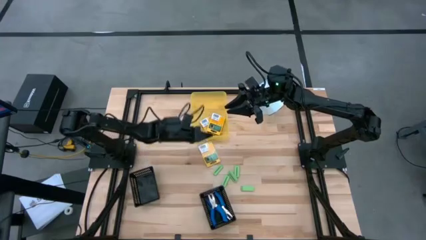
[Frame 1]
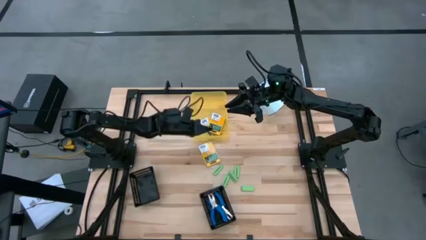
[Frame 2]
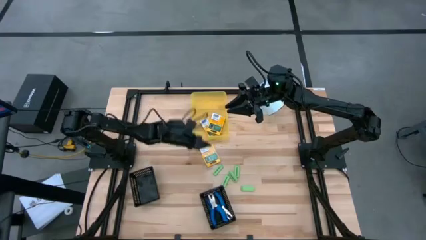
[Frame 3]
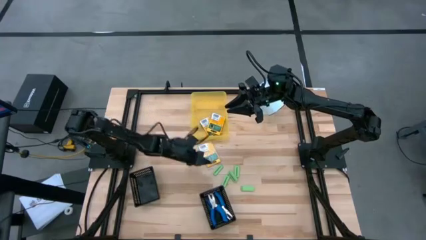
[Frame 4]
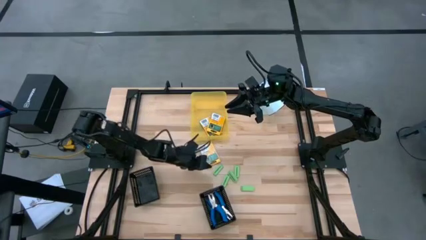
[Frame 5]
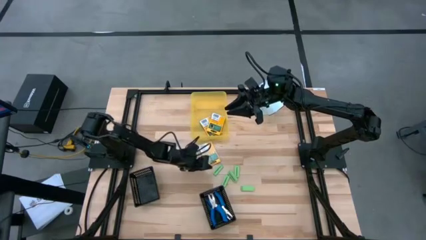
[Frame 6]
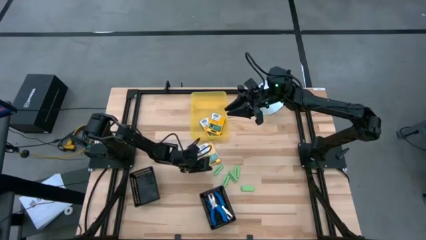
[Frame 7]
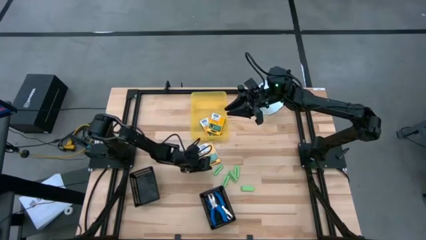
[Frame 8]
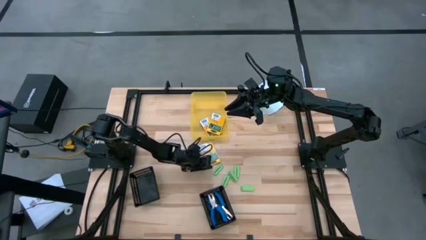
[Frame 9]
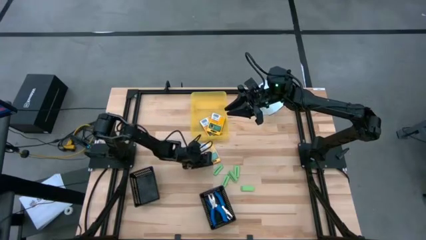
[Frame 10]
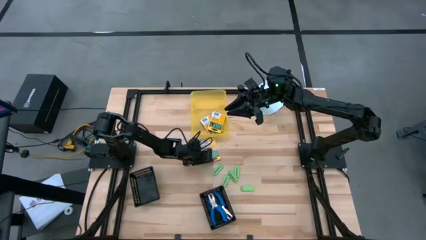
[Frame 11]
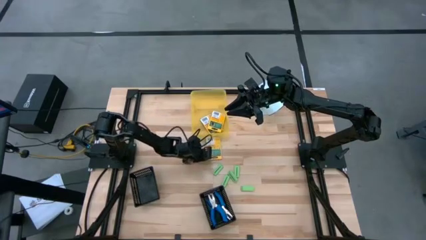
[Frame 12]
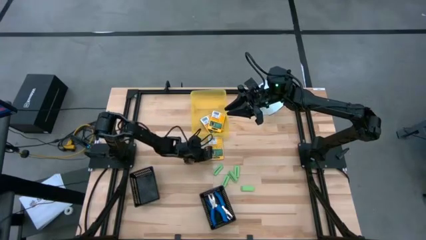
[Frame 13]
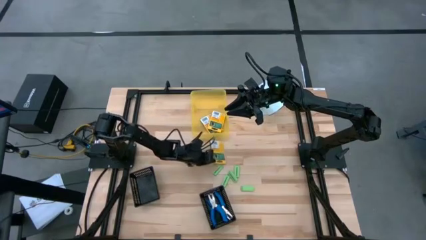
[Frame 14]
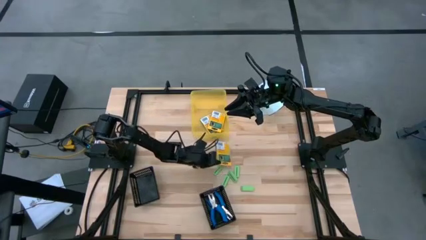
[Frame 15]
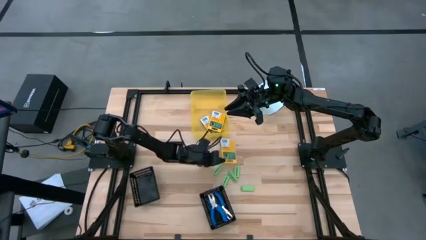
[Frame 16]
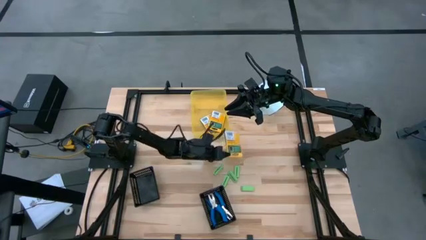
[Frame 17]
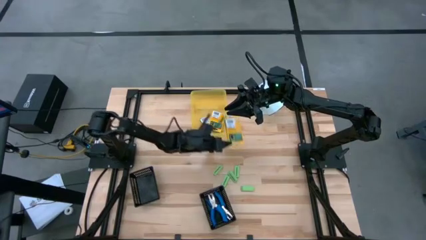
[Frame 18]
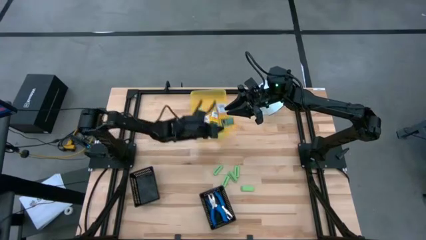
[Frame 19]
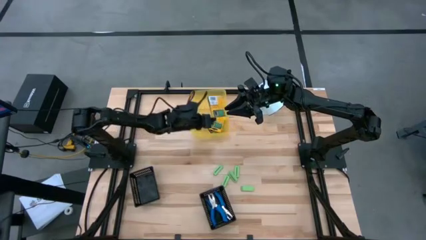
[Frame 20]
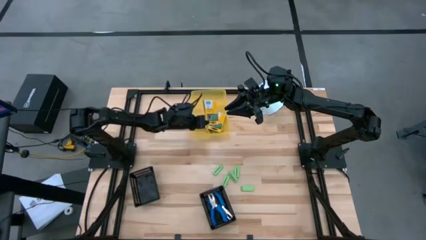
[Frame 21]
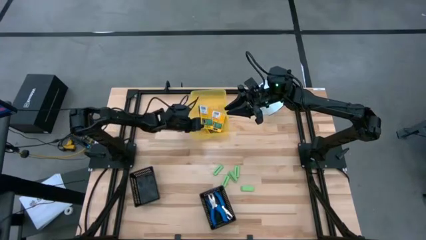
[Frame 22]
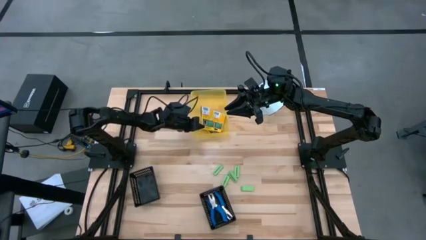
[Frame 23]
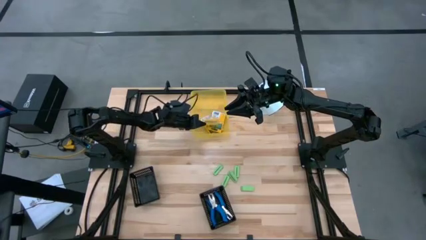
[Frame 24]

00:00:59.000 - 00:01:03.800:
Task: Pick & Place School Supplies
Put the box of crayon into the yellow bin

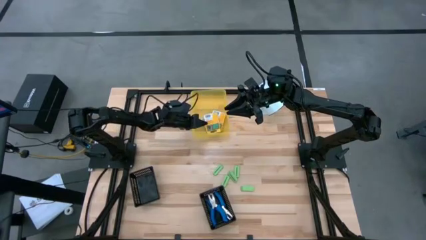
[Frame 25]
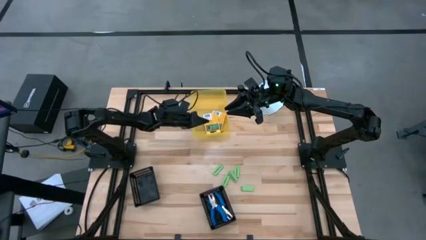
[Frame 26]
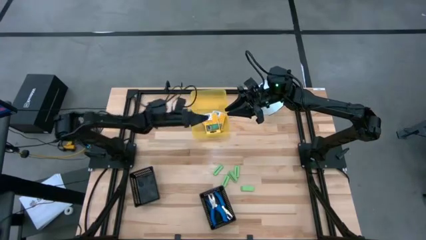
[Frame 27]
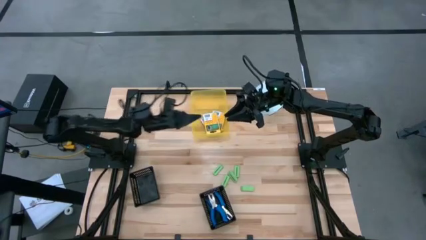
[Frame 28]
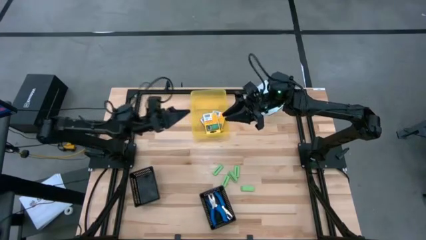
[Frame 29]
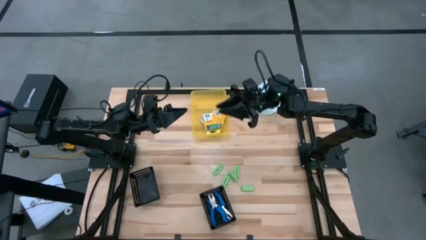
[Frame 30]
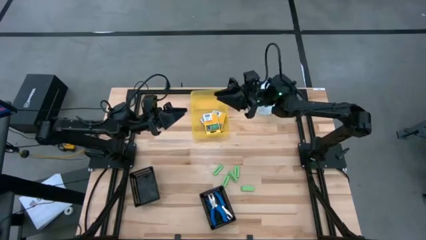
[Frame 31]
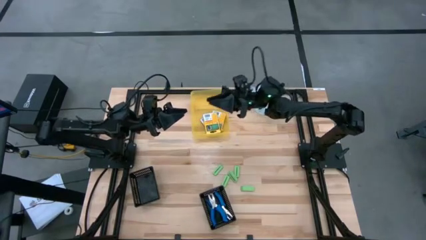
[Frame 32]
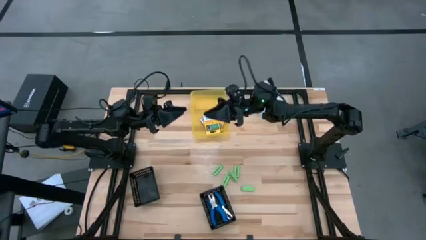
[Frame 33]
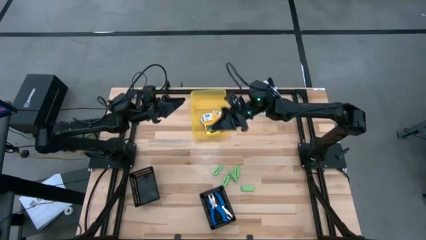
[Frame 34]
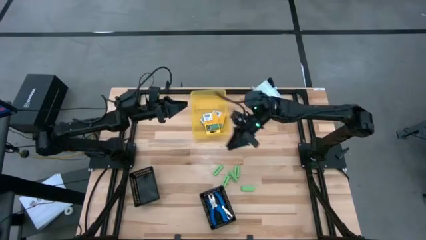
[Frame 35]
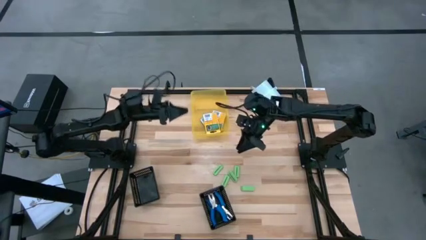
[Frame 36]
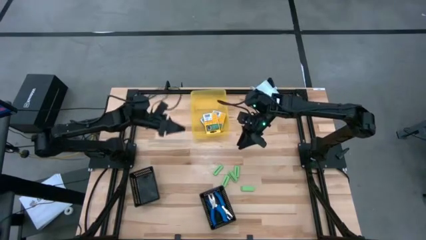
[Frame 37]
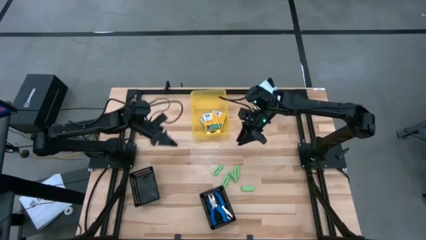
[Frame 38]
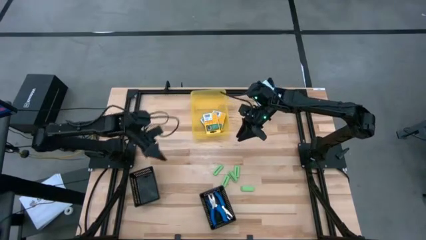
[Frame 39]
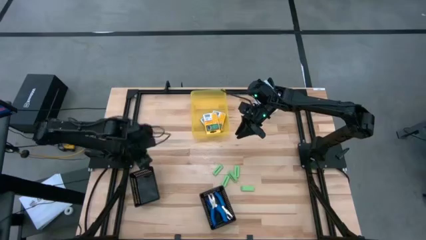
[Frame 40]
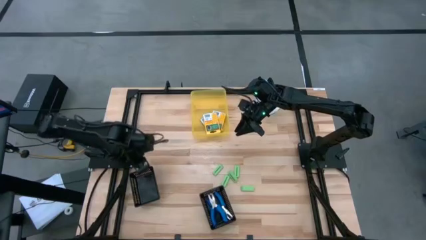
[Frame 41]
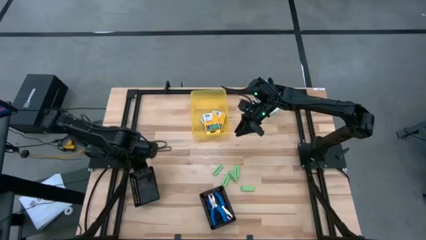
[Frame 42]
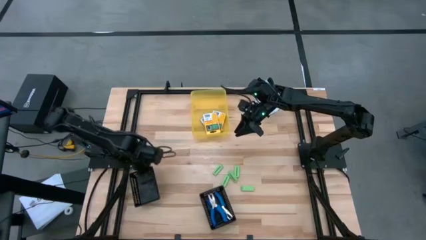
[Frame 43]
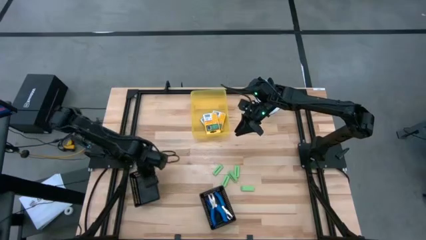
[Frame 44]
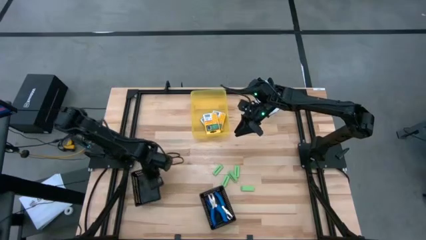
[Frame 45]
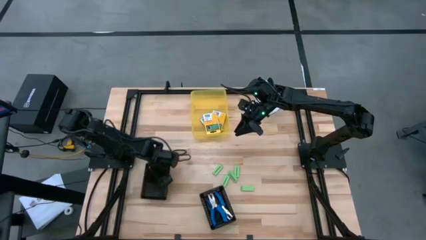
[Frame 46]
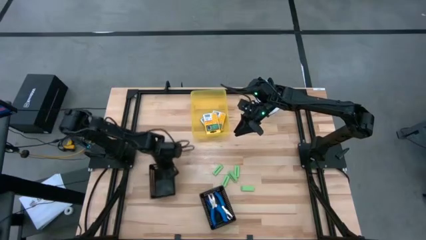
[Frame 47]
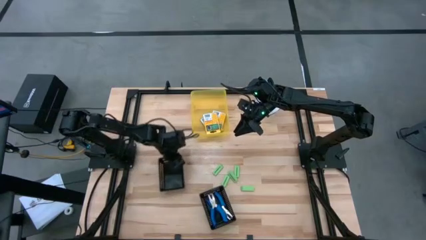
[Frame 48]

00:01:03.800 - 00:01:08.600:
Adjust the left black bin into the middle left of the table

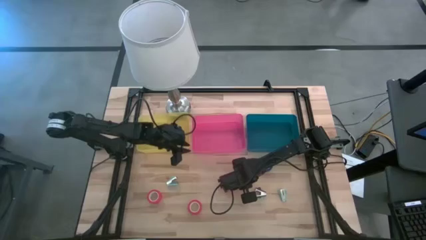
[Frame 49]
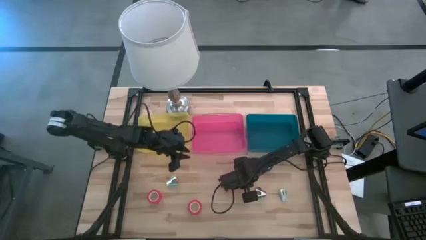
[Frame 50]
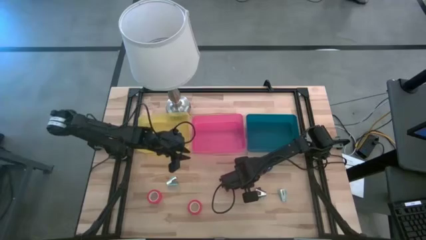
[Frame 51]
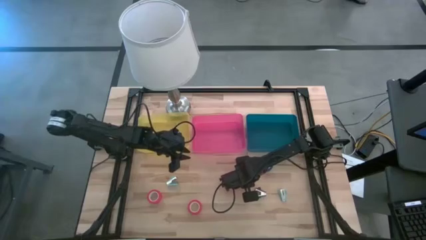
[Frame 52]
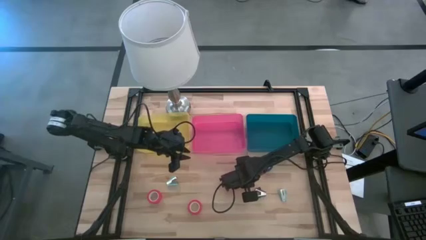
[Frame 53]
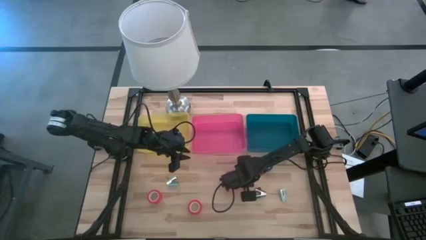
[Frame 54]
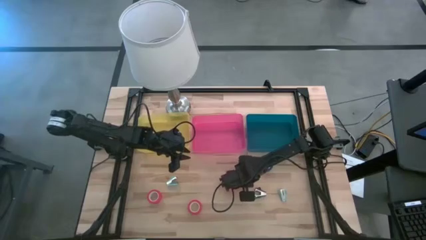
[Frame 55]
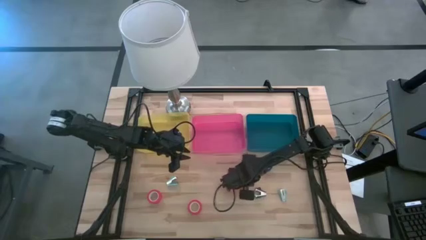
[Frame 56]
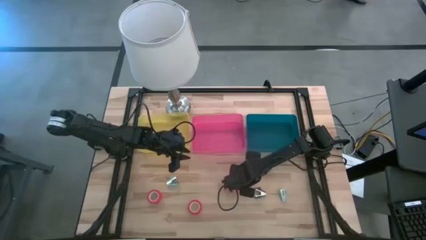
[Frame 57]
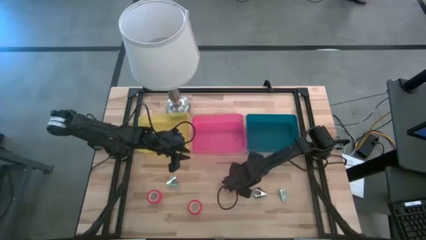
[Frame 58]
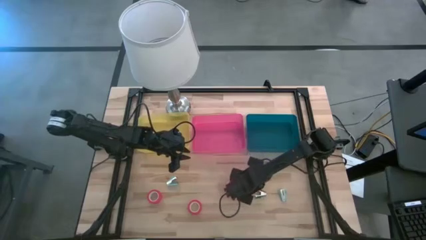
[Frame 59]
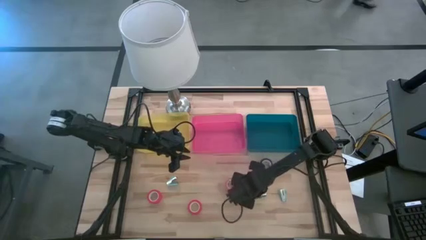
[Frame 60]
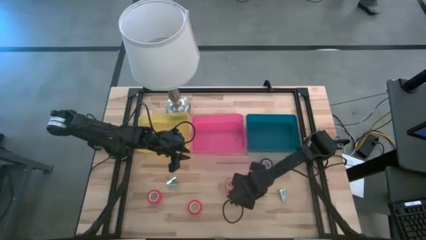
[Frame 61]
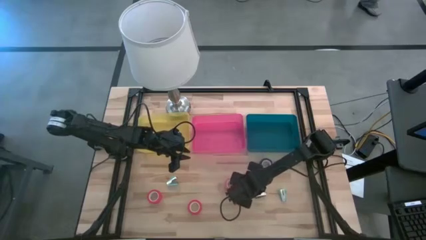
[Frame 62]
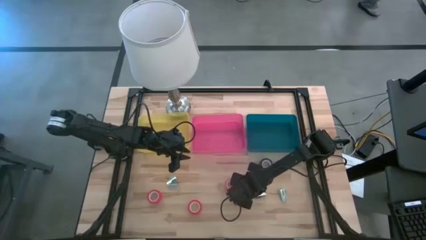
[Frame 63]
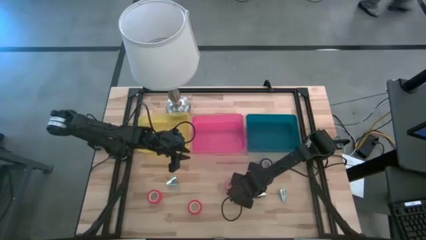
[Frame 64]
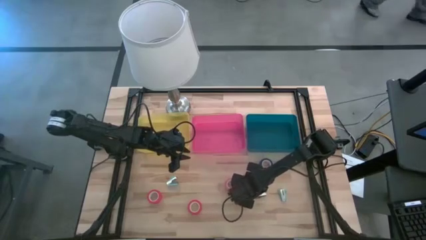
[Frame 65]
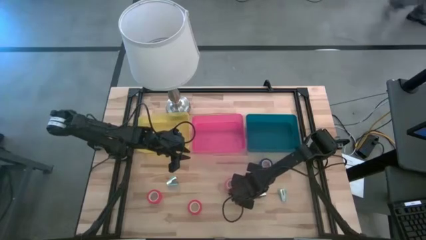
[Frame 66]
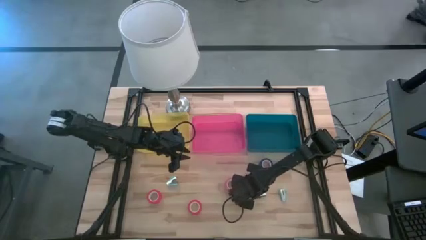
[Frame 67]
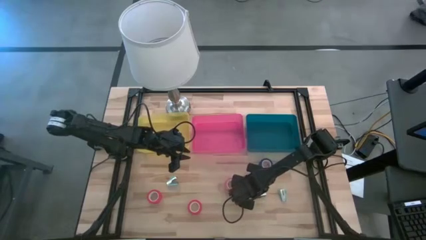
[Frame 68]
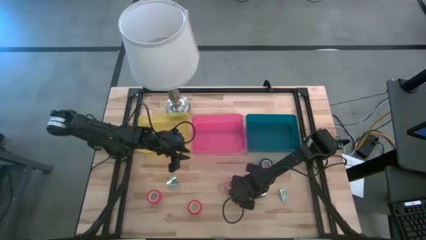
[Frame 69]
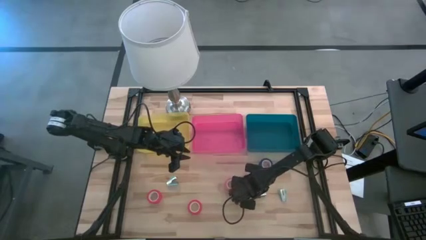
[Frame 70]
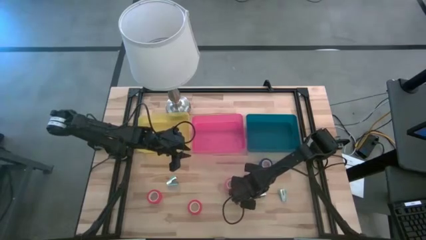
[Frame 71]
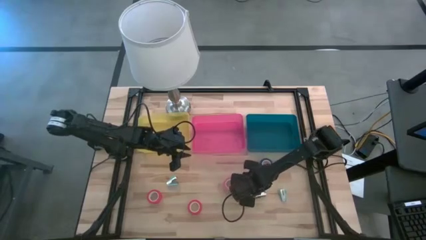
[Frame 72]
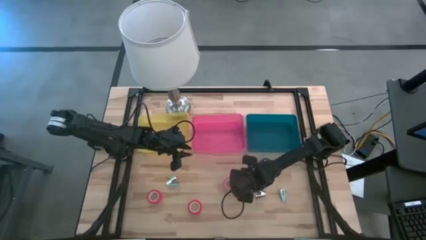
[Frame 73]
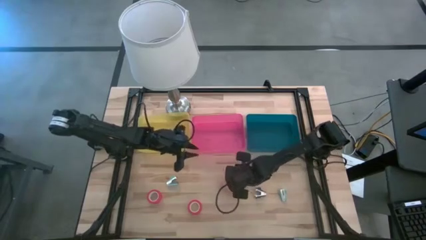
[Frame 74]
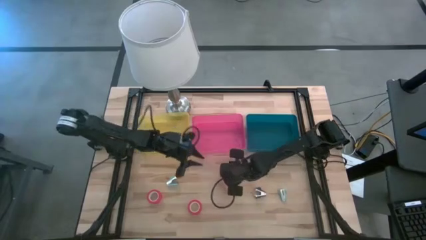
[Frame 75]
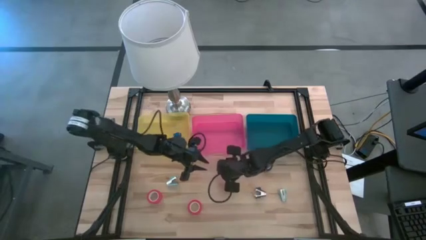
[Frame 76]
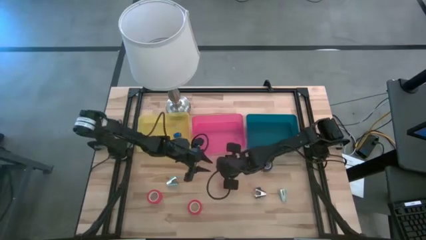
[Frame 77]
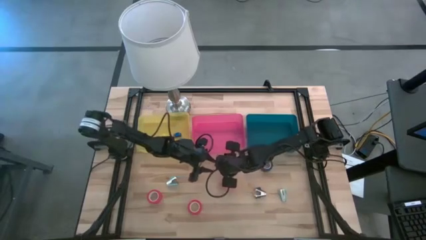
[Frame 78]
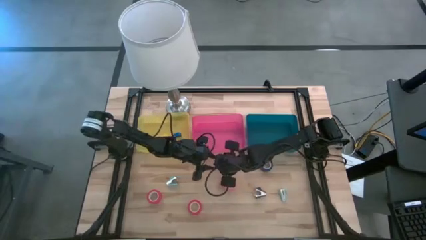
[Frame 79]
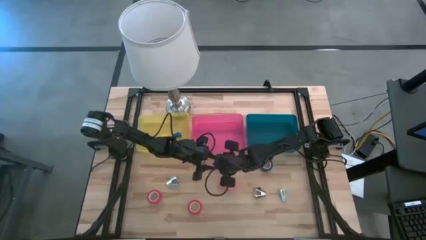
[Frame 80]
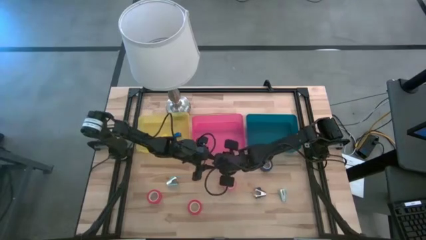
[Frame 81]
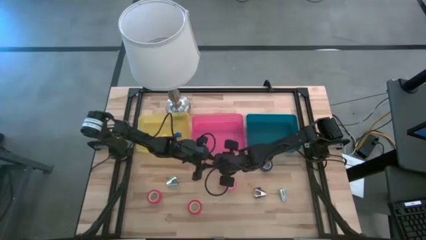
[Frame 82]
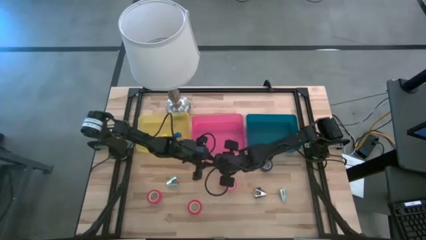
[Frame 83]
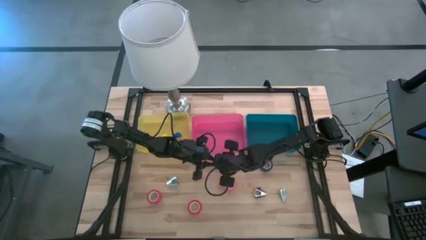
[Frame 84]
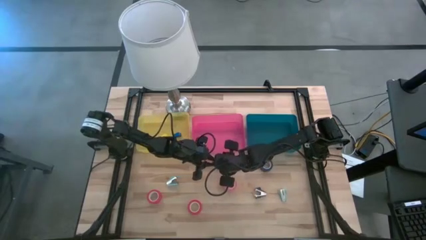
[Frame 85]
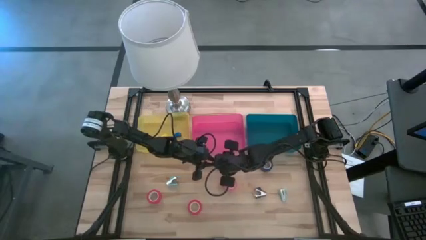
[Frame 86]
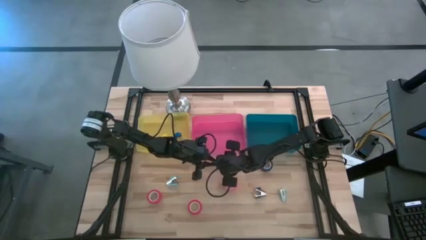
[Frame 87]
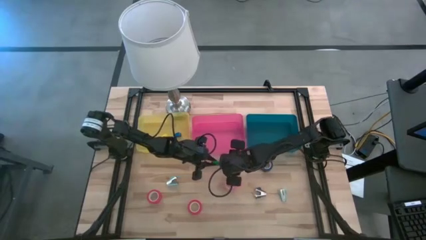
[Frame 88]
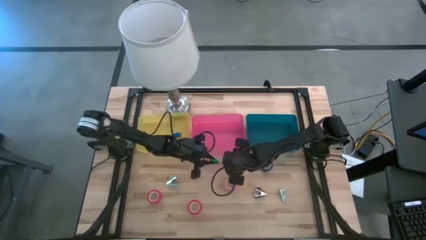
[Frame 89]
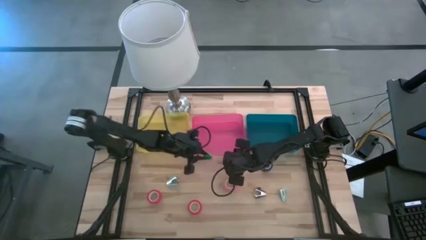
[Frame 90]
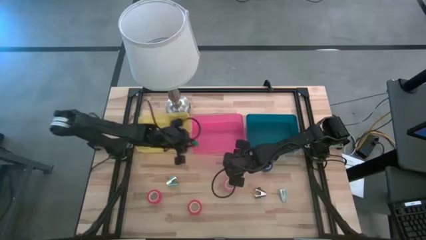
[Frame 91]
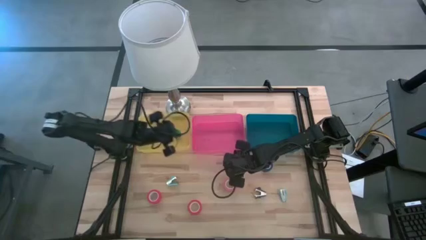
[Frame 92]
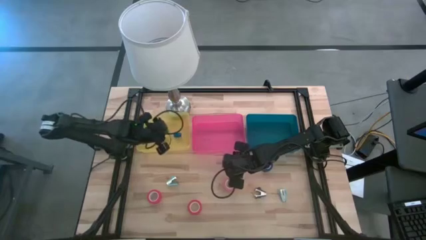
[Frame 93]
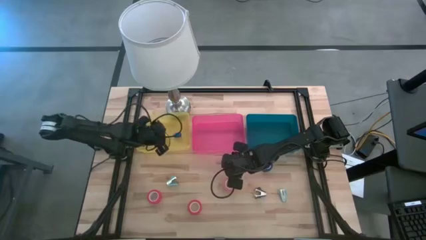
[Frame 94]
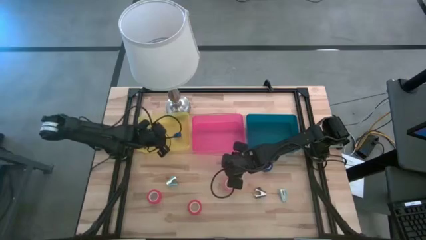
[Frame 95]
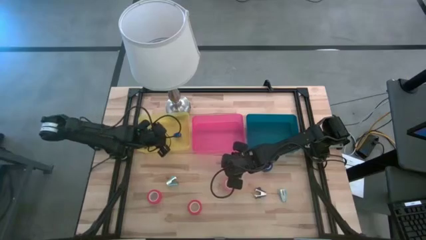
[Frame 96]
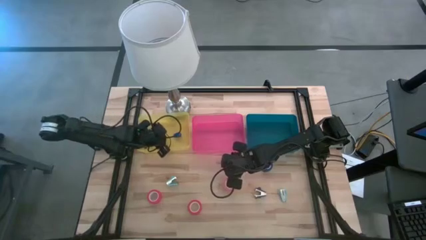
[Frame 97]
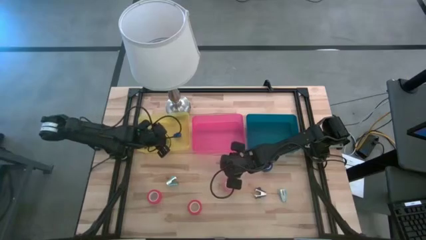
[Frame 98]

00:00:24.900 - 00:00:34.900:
Task: Pick and place Stapler, Stapler remover, tape
Put the green stapler into the yellow bin
